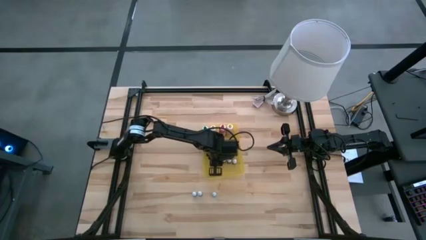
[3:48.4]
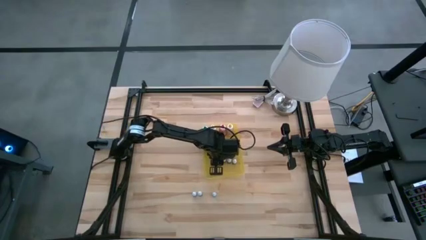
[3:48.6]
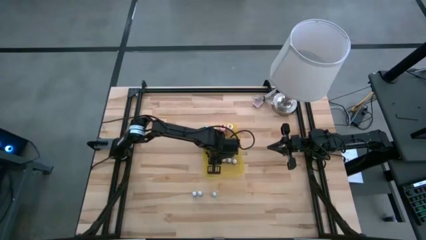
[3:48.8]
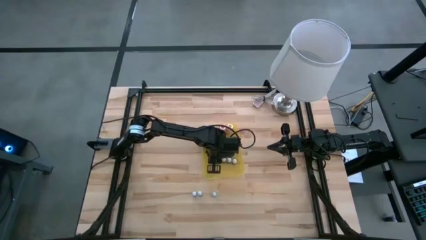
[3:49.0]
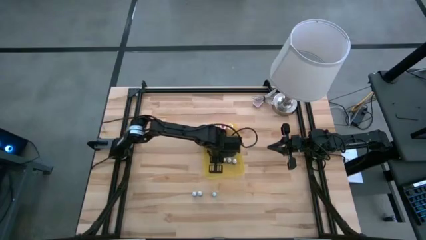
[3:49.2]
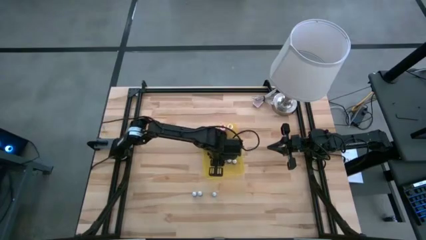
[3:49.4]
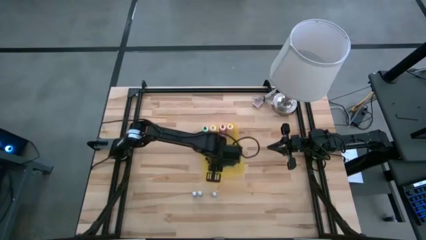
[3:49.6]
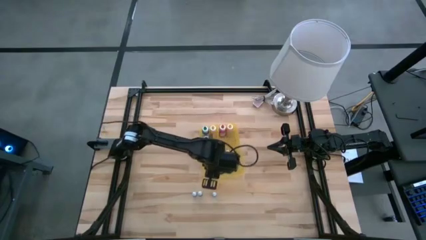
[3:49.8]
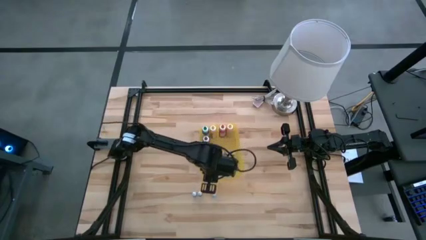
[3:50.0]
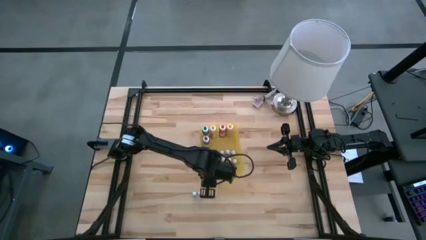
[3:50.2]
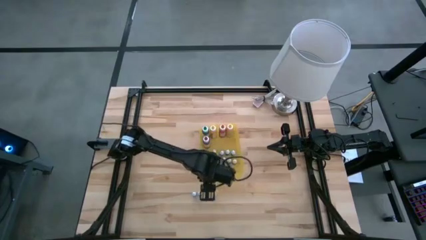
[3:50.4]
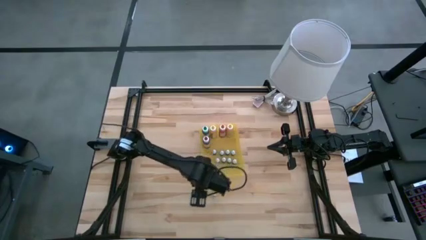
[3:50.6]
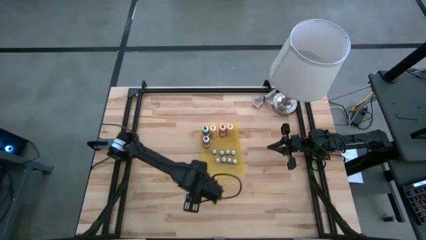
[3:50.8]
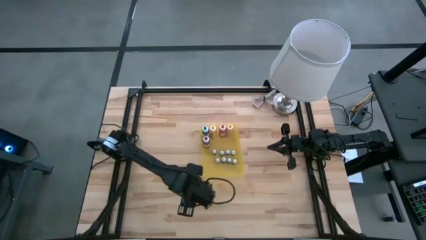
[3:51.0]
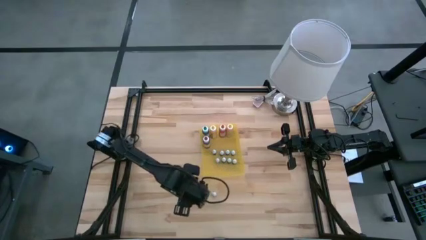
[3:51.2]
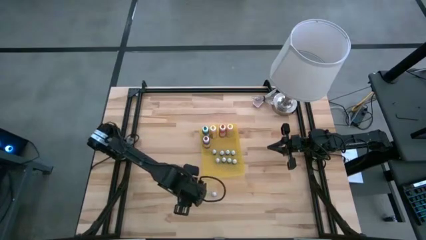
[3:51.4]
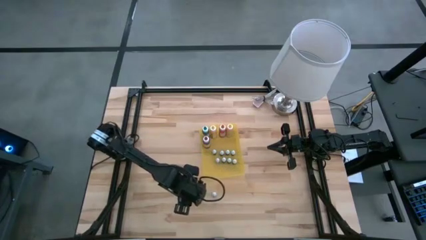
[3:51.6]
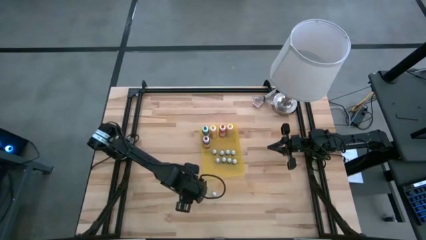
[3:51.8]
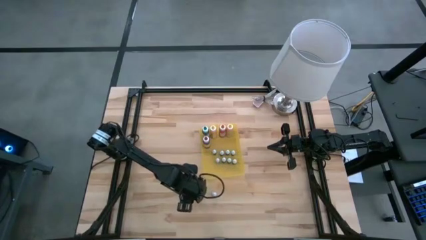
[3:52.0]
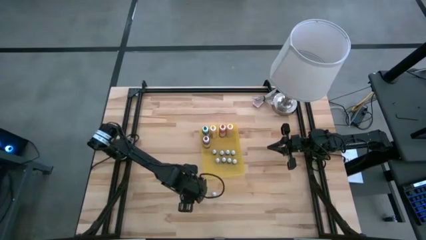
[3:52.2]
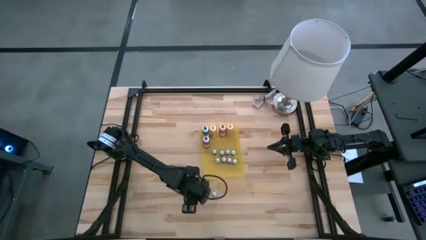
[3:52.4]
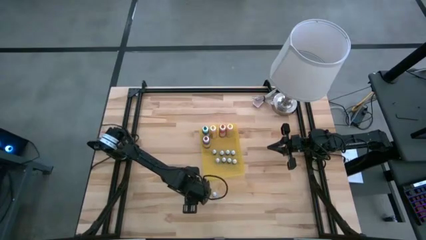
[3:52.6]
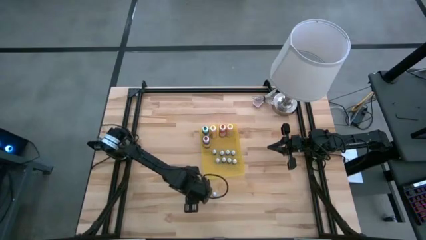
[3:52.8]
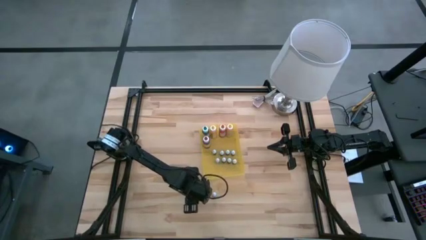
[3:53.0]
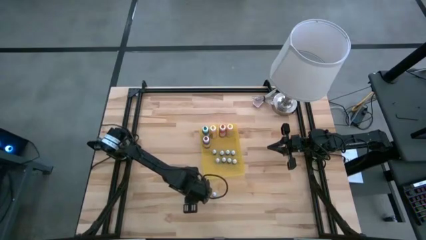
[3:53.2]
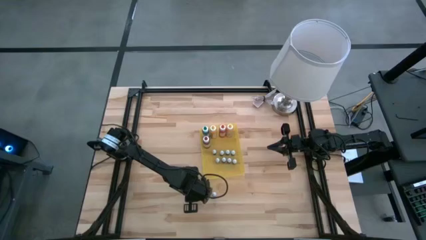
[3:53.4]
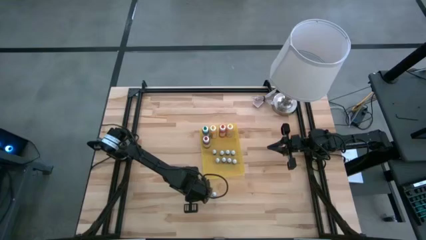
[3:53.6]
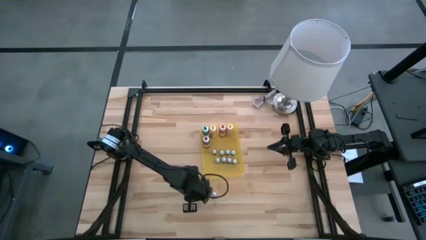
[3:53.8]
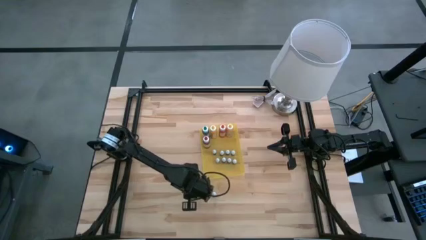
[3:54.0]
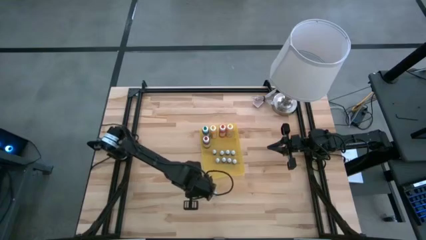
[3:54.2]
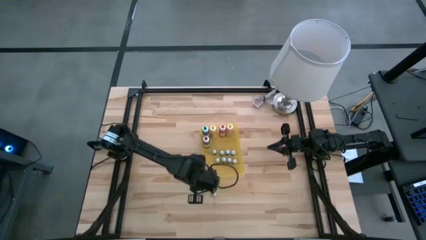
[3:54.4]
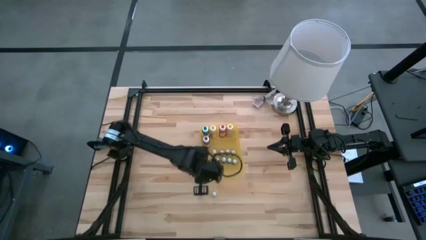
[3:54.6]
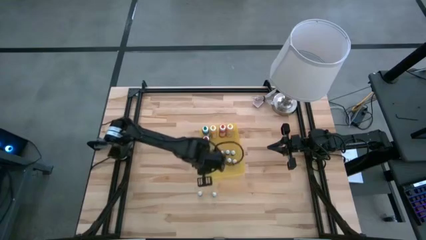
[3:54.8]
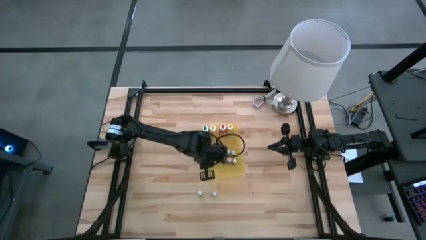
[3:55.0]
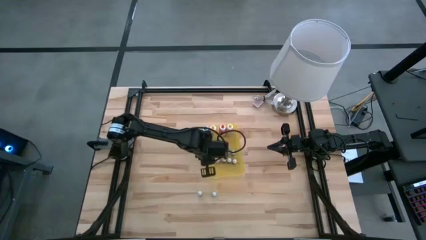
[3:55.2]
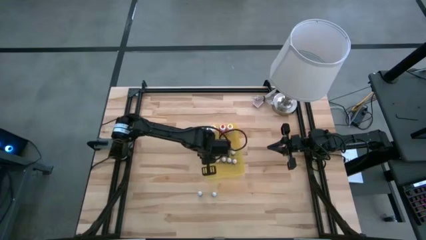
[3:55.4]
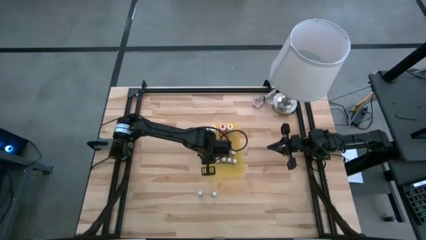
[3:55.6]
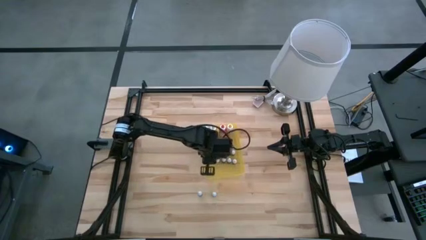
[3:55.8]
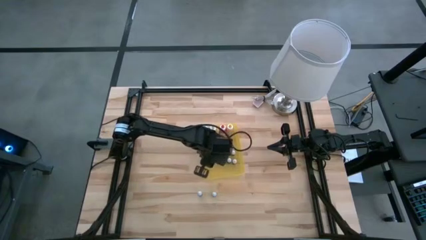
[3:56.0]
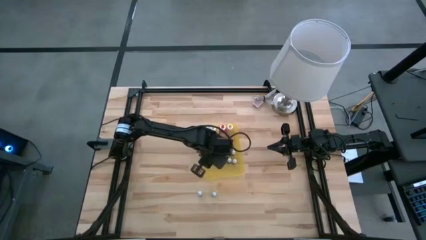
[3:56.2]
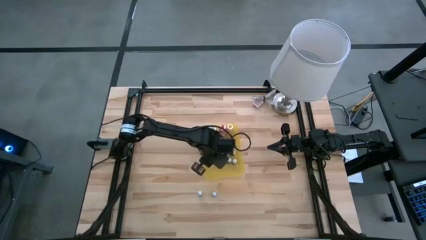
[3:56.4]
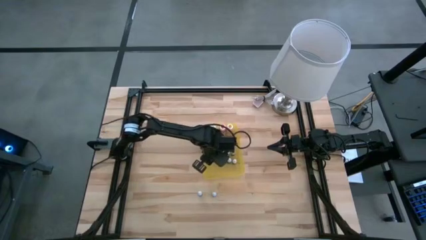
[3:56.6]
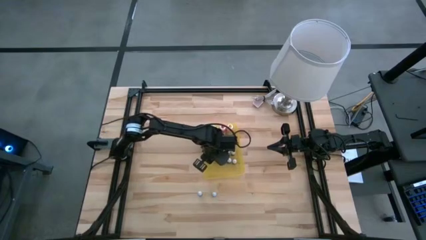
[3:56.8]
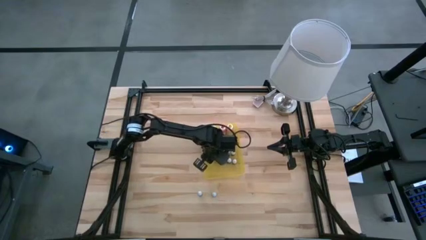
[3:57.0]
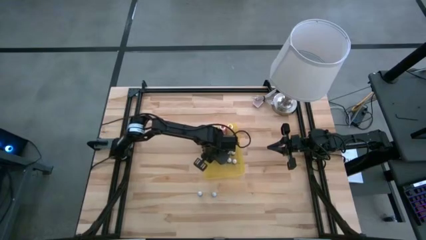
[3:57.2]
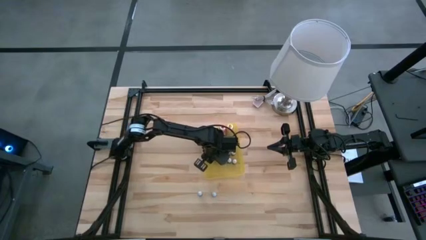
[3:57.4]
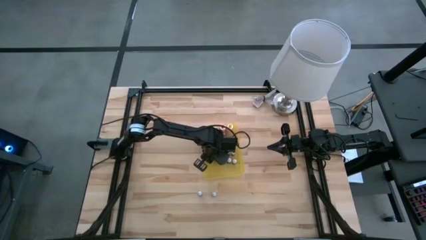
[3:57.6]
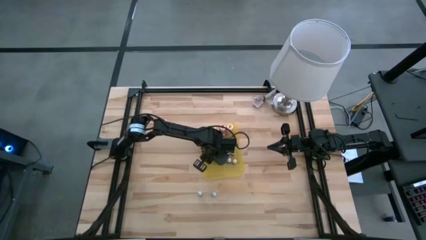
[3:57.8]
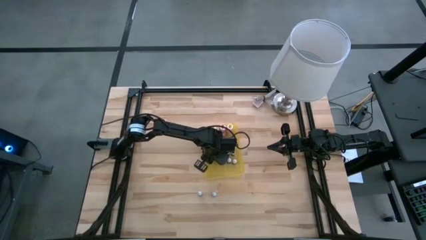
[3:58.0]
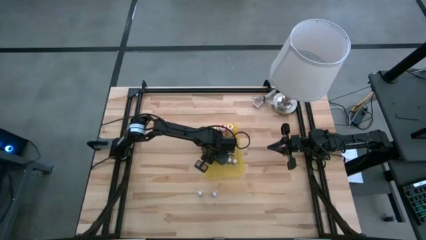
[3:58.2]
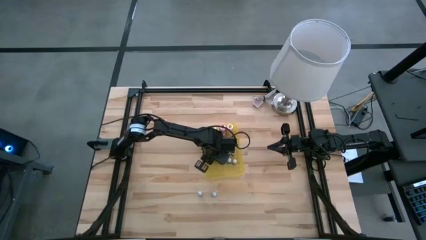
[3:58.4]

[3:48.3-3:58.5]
Task: Pick & Place food coloring
Put the small green food coloring bottle into the bin

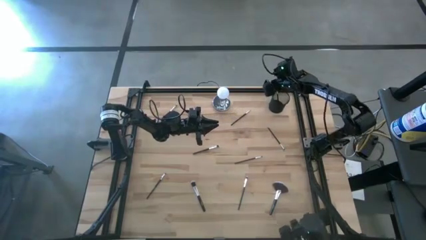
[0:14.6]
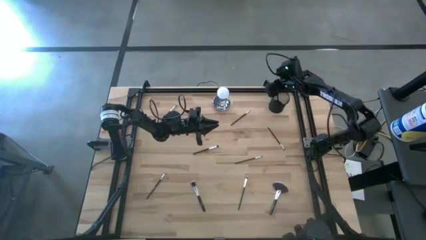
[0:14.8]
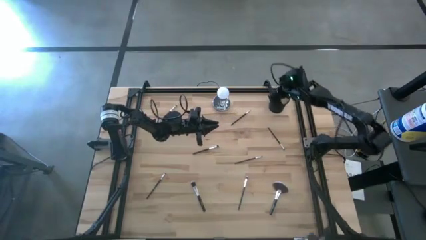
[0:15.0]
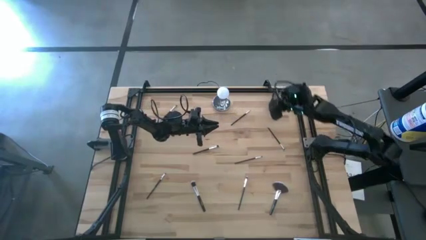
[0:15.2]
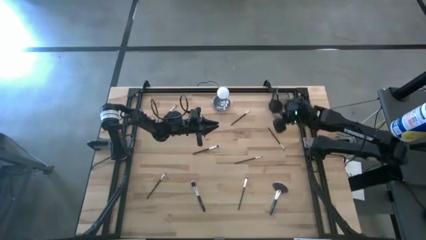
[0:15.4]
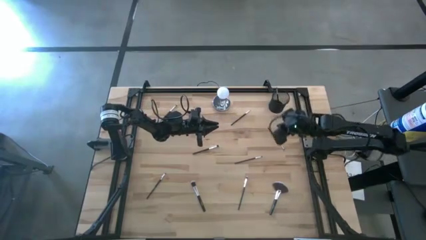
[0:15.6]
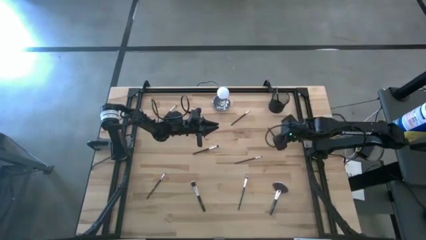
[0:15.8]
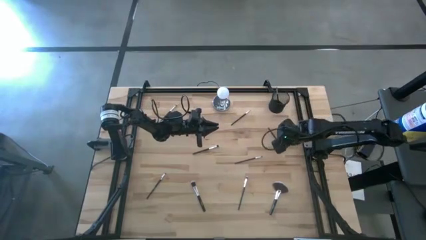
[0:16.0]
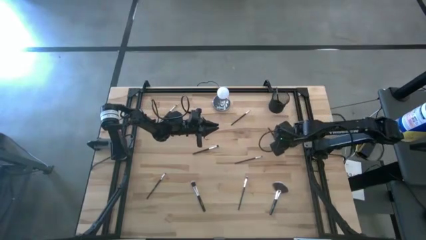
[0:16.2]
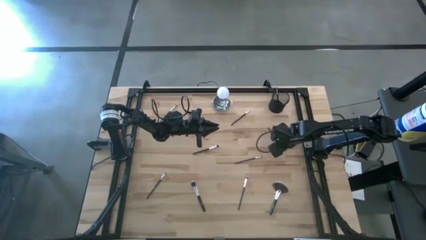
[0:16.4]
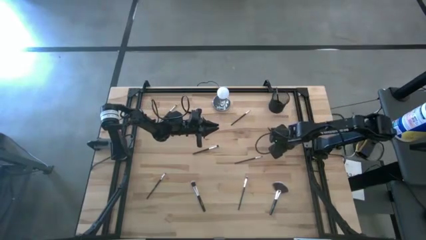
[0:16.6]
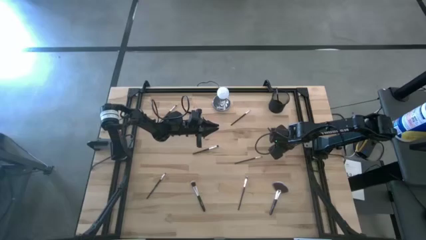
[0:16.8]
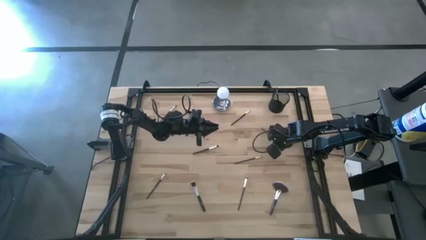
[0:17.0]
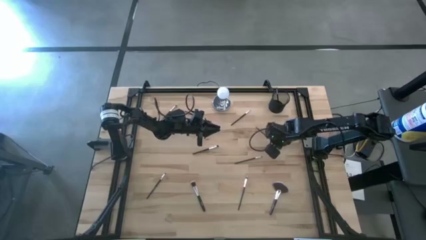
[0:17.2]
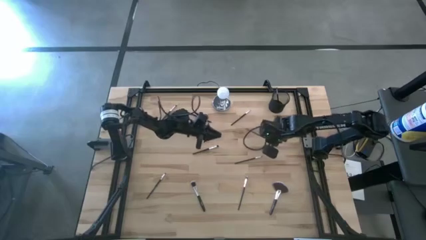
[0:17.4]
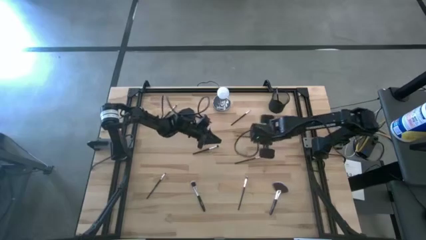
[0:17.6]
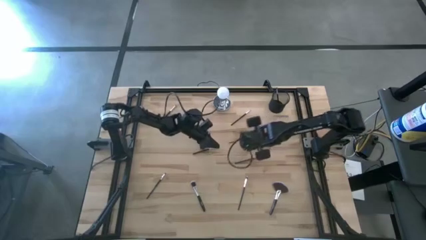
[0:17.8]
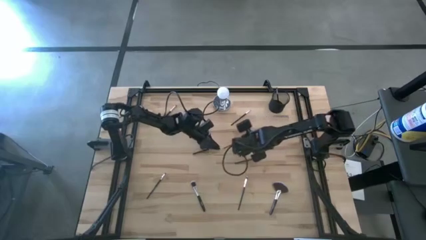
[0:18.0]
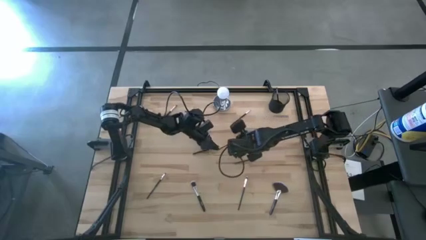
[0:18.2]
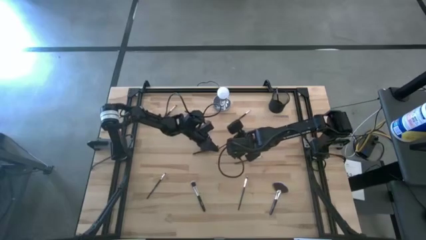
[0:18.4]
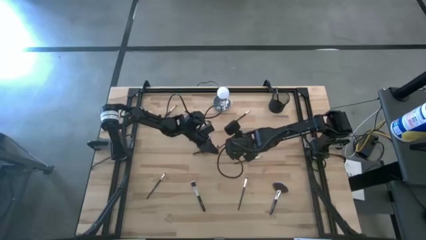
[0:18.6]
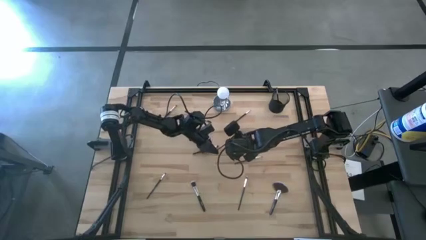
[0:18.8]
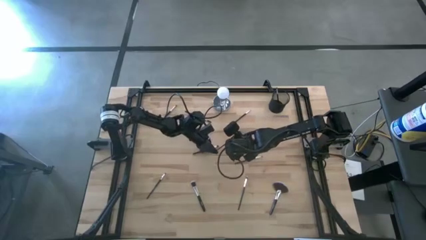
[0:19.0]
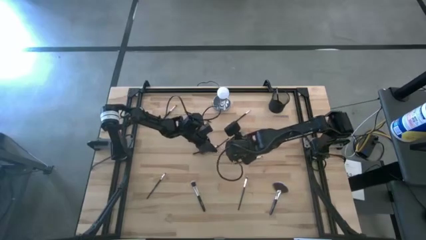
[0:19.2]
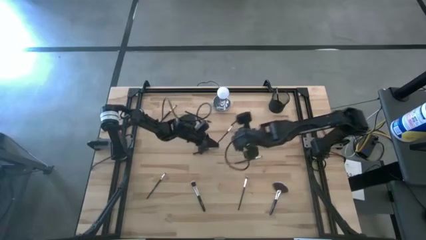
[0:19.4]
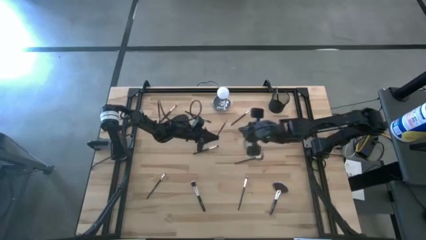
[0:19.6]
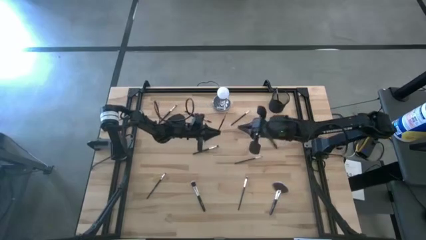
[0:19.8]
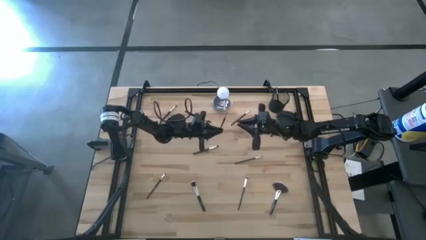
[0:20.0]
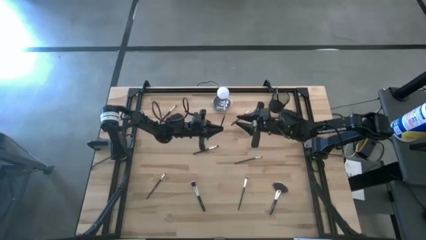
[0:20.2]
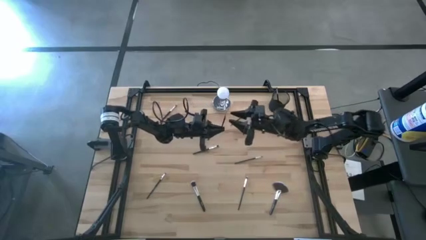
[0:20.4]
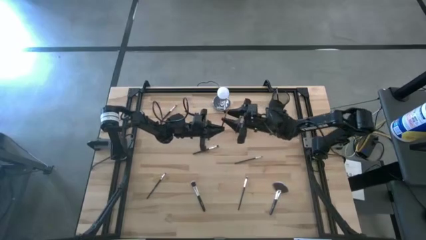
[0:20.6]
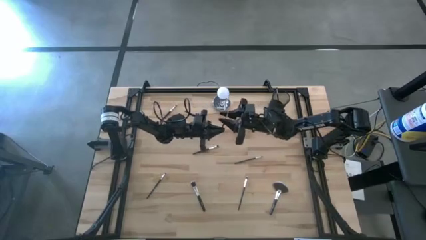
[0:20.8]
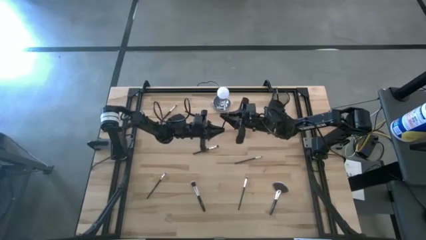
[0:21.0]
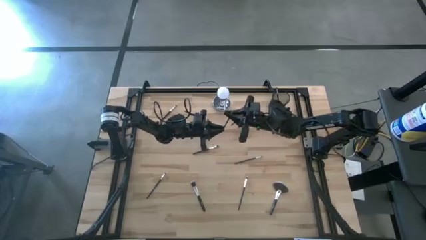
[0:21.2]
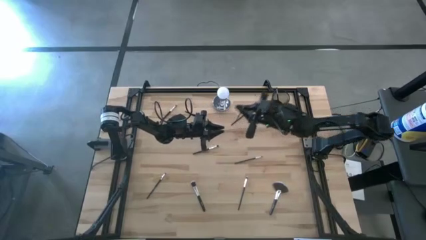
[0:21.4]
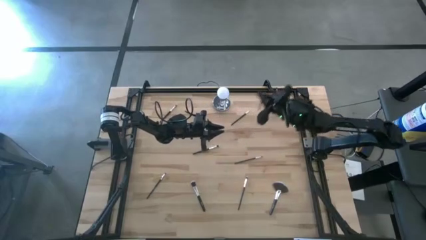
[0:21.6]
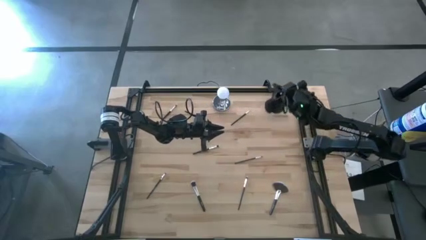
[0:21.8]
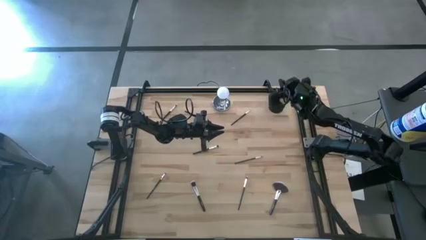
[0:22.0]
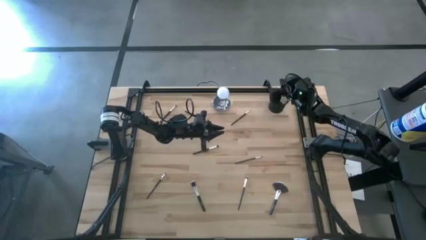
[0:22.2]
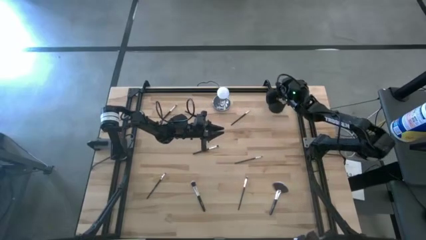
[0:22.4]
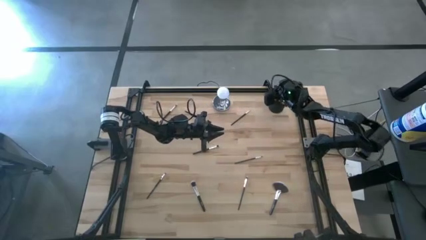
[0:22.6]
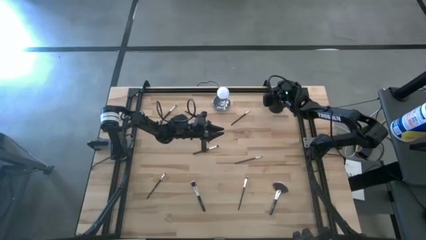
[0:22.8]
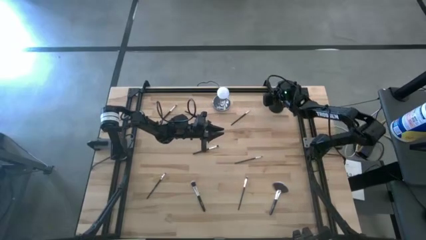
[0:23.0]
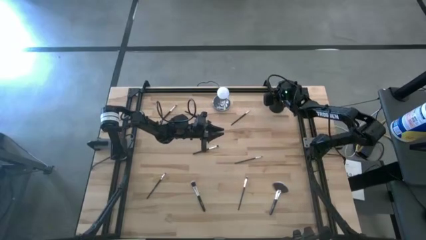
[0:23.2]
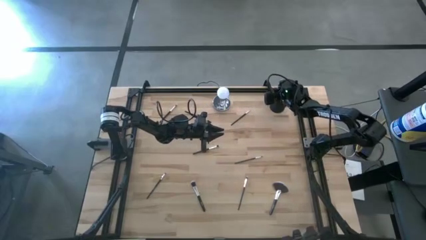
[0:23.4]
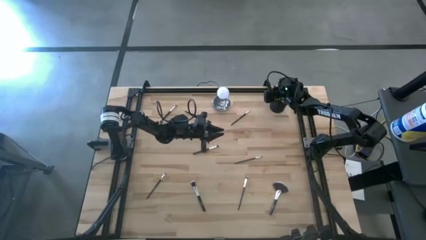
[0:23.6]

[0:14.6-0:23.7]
Task: Put items in baskets/containers
Put the black eyeshadow brush into the black pen holder
